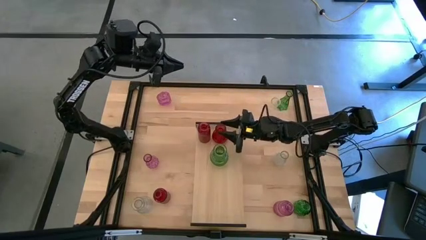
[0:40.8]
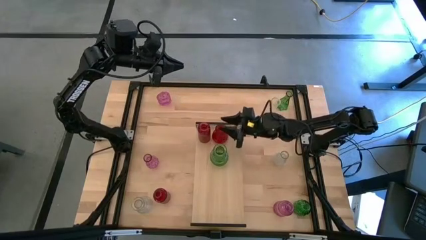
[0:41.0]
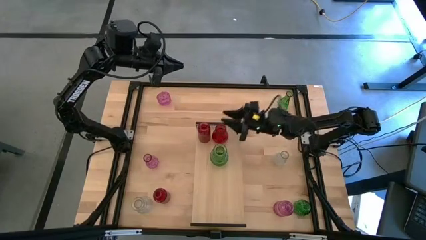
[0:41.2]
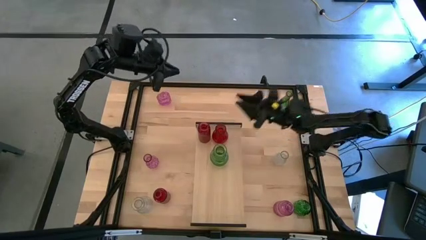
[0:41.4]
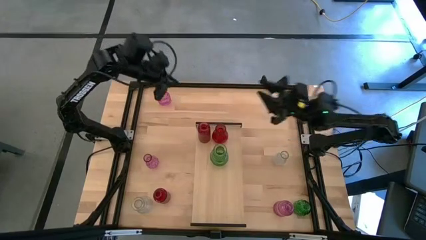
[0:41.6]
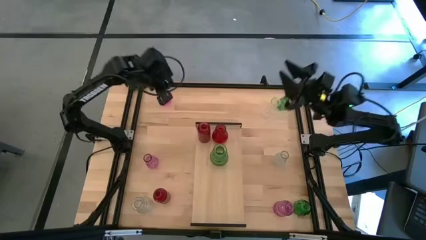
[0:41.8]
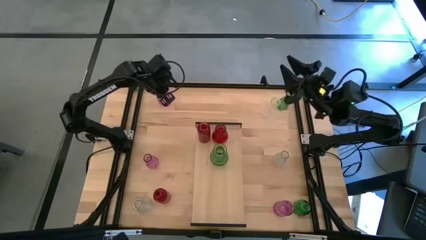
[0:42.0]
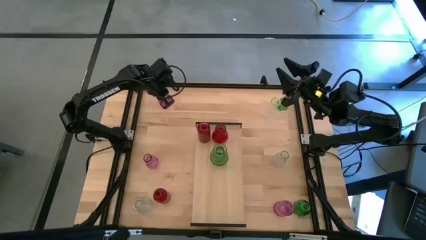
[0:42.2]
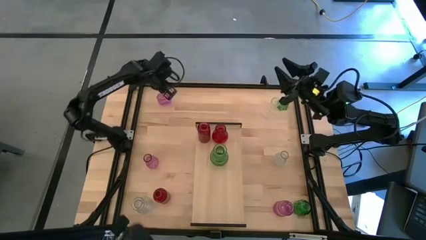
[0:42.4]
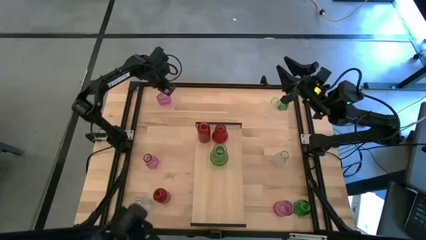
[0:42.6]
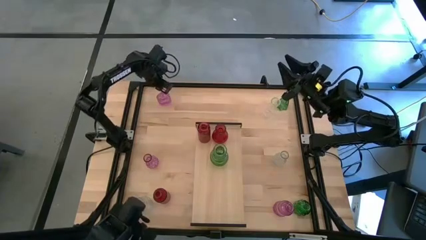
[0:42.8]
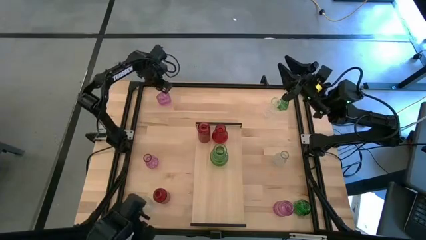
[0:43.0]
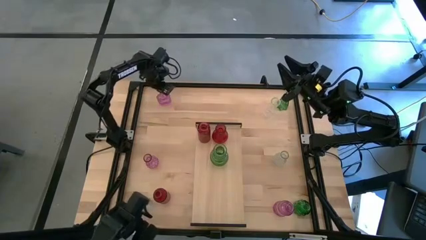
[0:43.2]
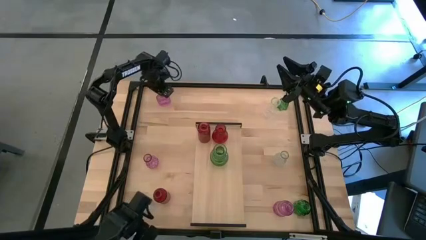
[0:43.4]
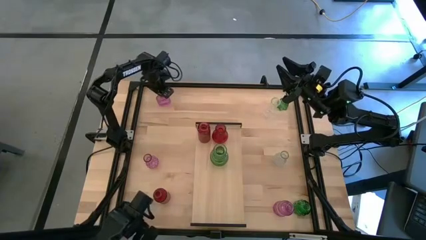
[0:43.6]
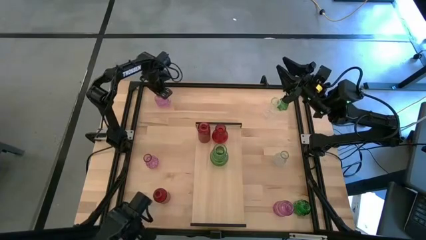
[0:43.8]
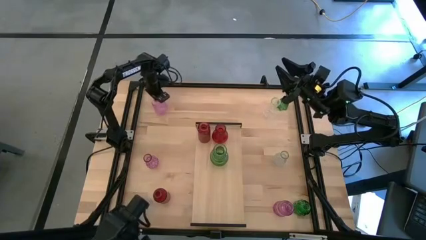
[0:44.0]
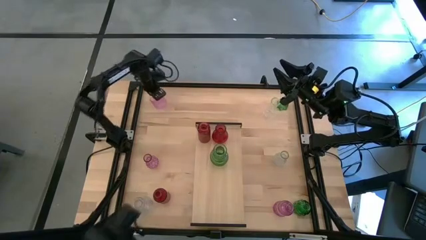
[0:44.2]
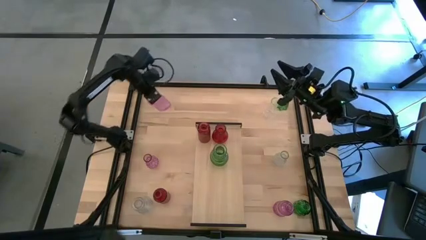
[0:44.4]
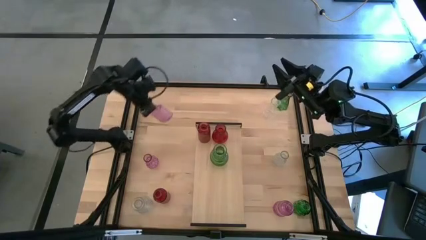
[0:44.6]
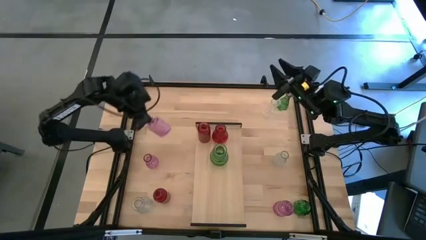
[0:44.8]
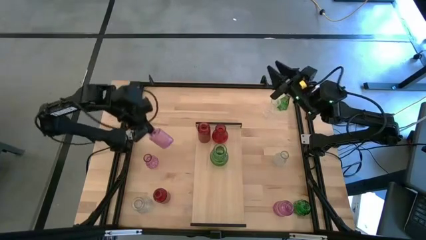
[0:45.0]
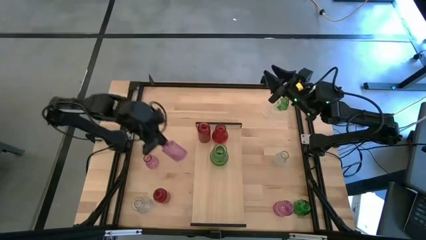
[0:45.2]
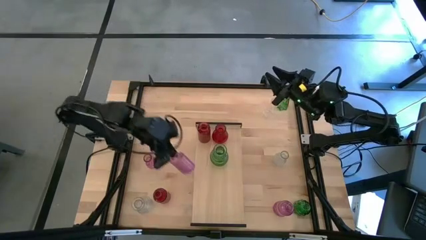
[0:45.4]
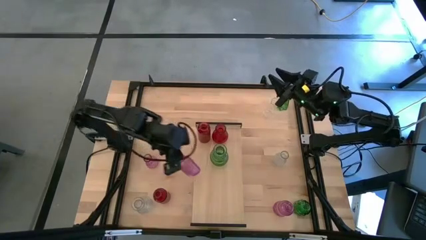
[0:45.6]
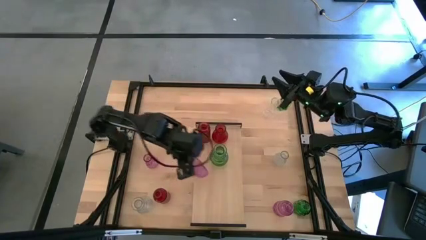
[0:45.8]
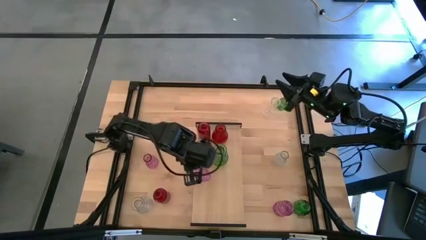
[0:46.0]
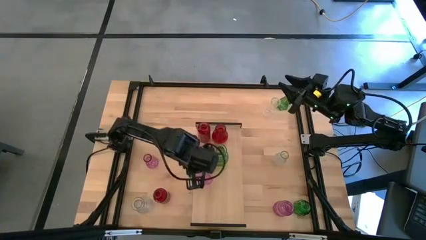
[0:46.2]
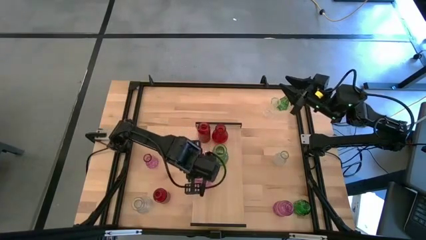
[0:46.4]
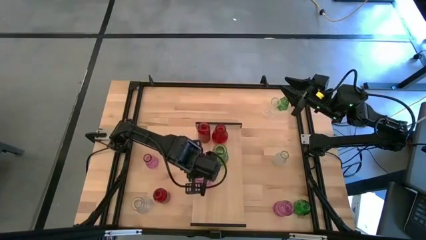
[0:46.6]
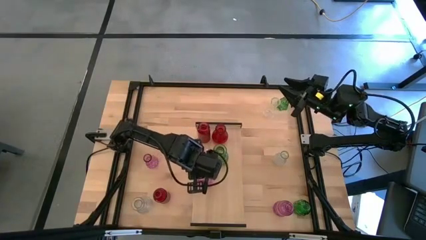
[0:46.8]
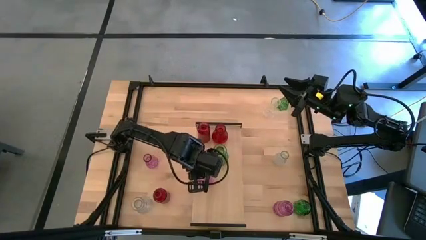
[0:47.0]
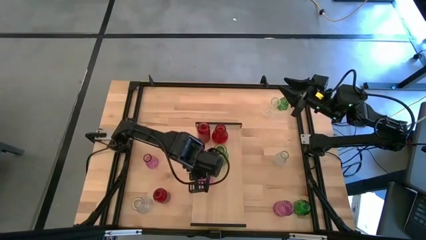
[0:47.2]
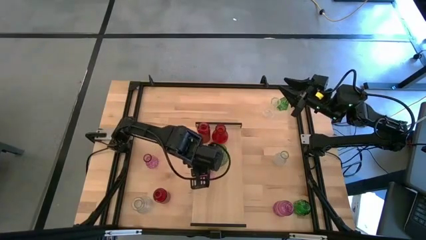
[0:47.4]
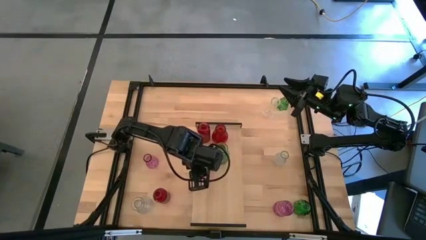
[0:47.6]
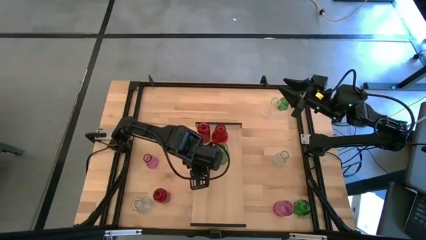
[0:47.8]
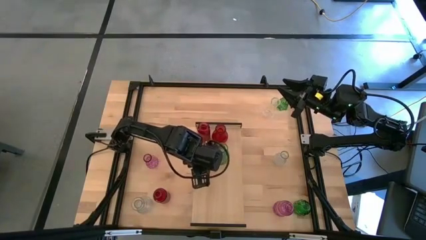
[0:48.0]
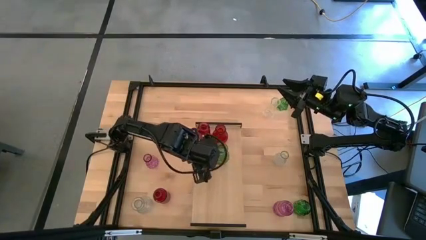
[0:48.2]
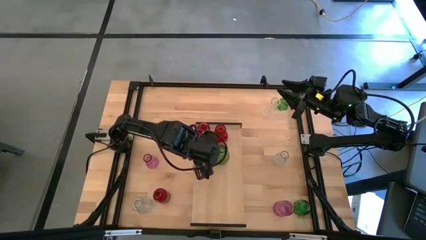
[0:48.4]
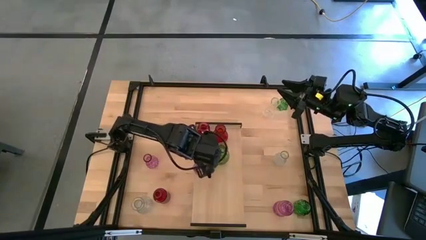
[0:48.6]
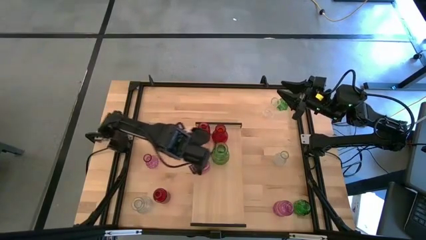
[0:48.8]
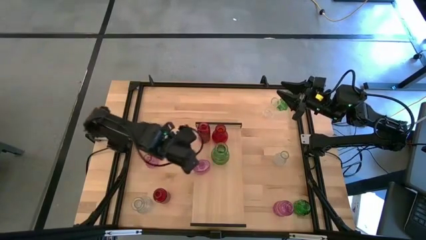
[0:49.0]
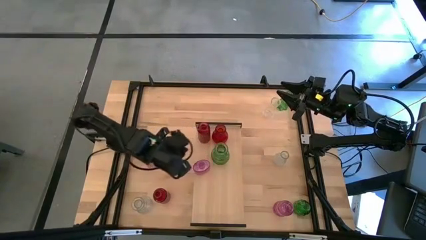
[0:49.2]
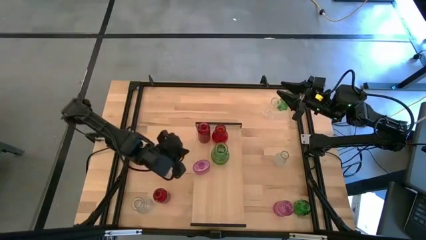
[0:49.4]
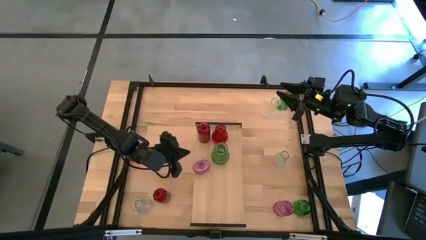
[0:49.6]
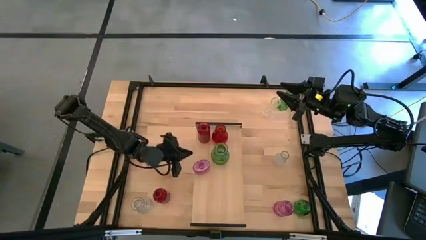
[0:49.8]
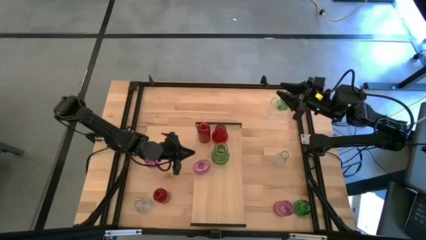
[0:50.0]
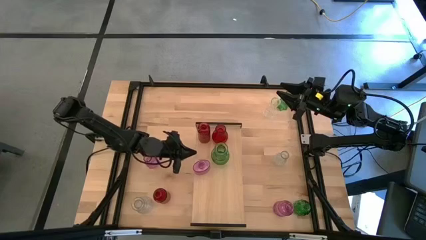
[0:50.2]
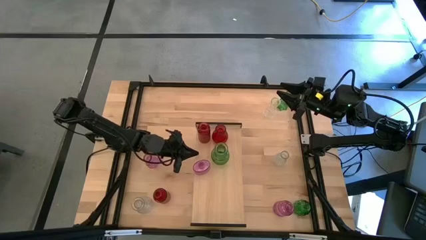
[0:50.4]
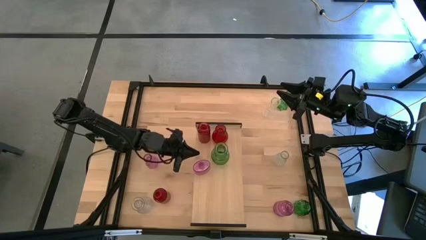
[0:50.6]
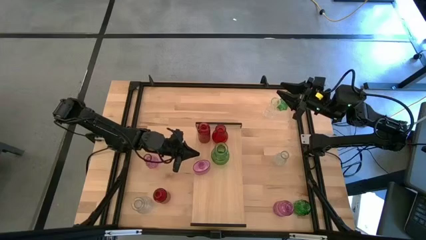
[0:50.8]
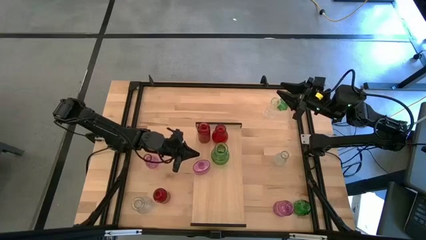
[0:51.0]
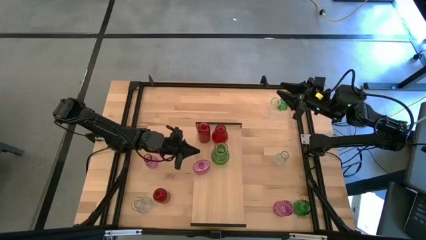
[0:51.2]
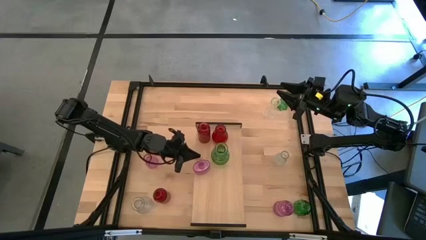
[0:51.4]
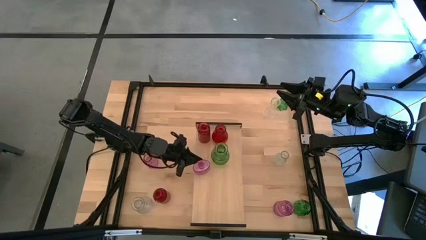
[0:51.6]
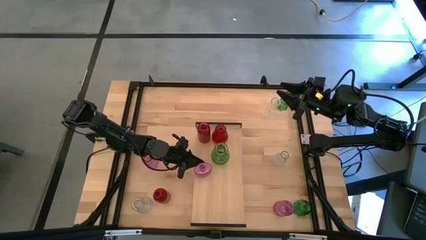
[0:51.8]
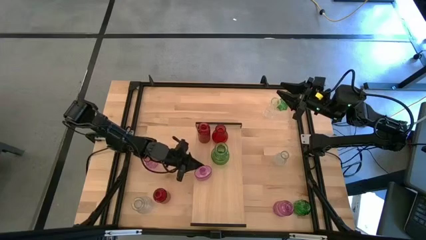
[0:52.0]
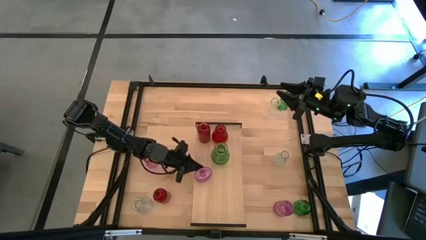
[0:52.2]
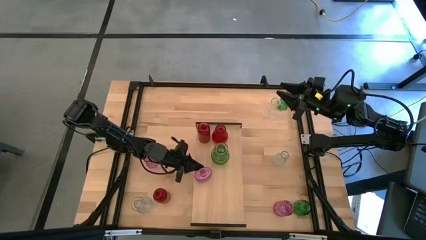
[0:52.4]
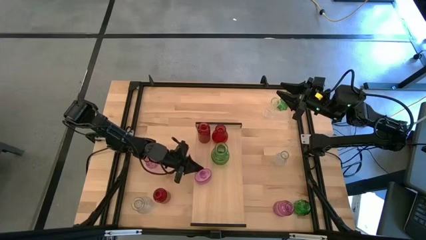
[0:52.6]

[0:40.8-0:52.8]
Task: sort vases onto shelf
Put the top left pink vase on the shelf

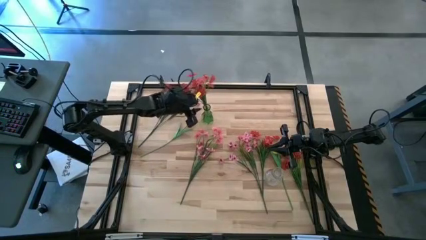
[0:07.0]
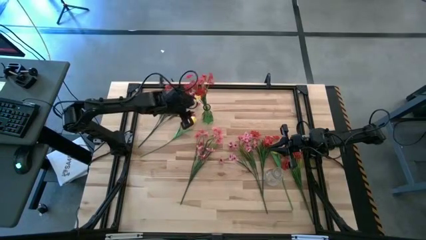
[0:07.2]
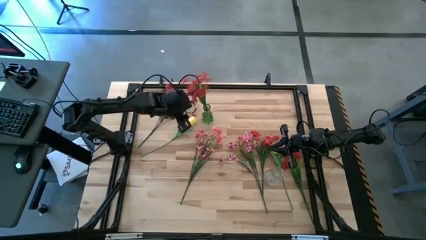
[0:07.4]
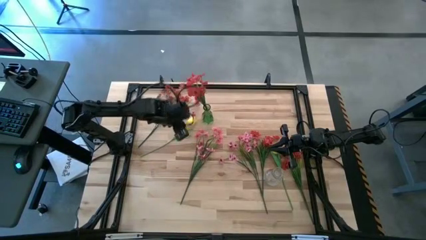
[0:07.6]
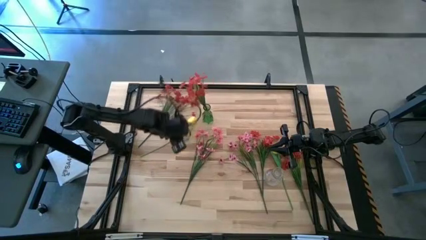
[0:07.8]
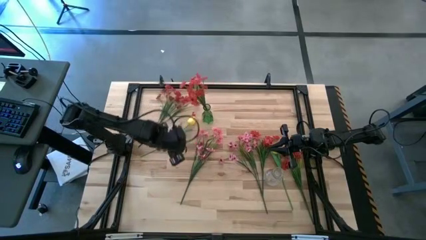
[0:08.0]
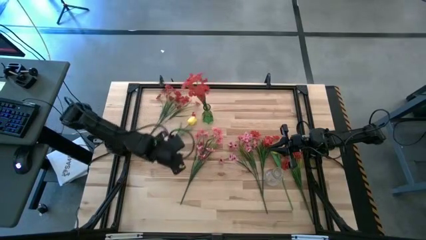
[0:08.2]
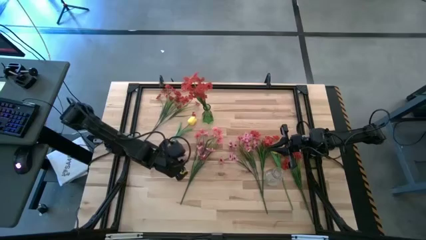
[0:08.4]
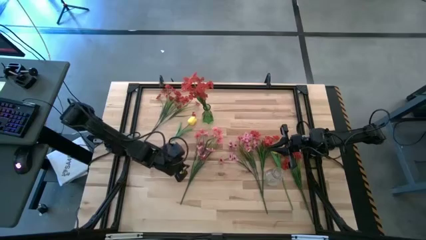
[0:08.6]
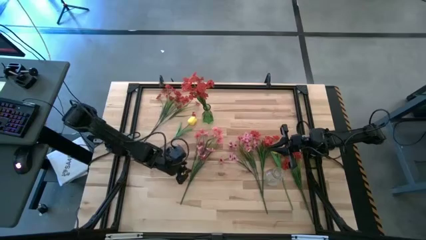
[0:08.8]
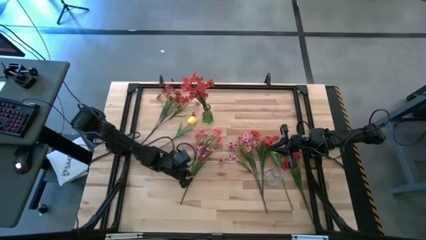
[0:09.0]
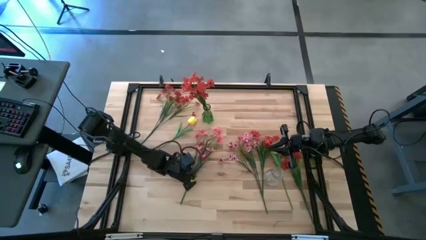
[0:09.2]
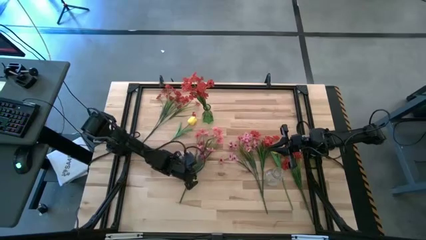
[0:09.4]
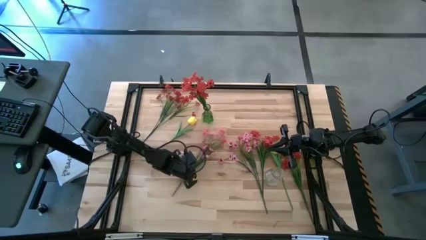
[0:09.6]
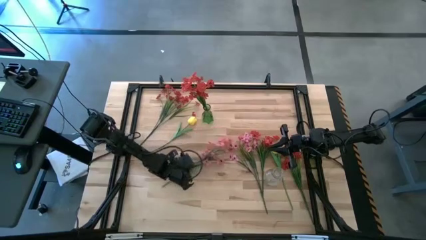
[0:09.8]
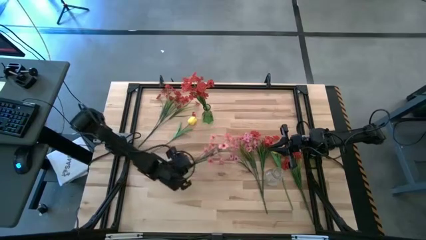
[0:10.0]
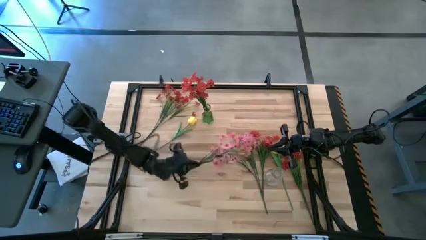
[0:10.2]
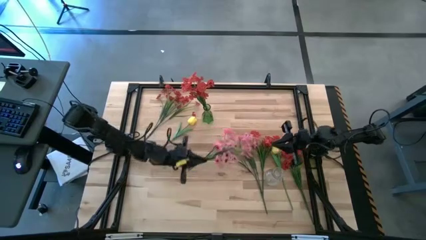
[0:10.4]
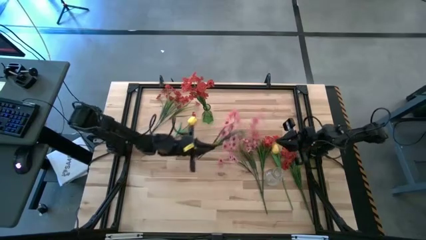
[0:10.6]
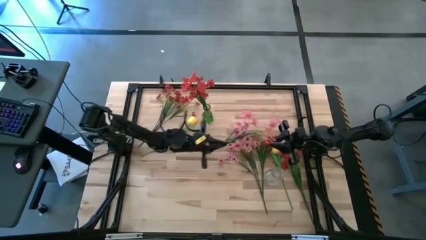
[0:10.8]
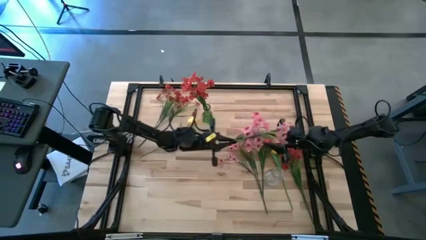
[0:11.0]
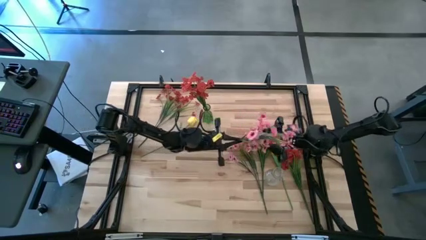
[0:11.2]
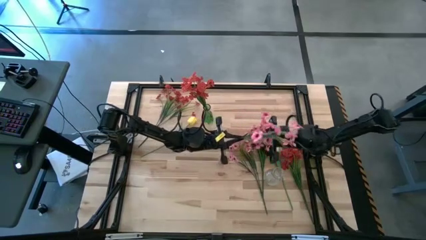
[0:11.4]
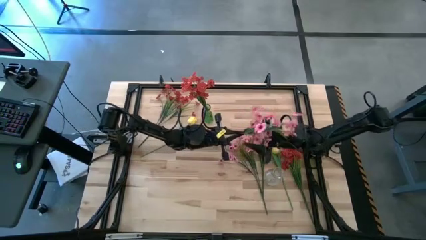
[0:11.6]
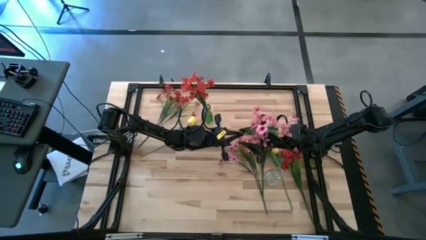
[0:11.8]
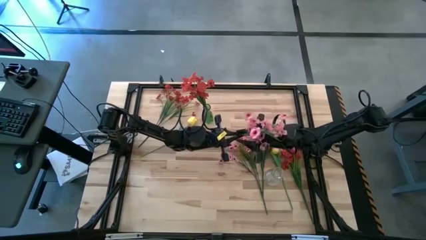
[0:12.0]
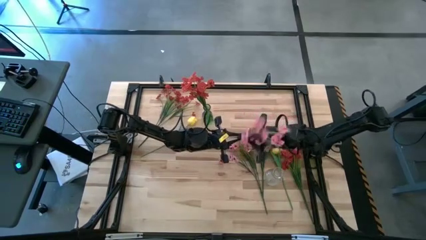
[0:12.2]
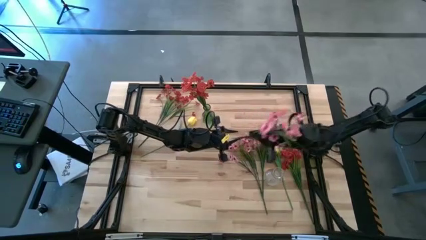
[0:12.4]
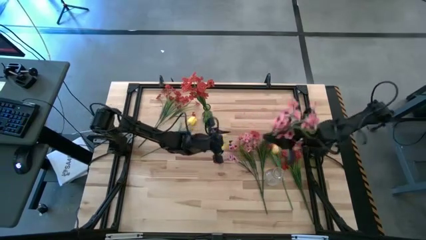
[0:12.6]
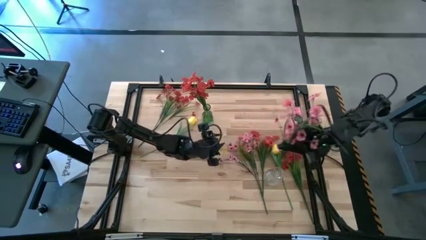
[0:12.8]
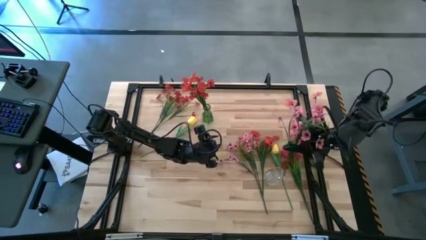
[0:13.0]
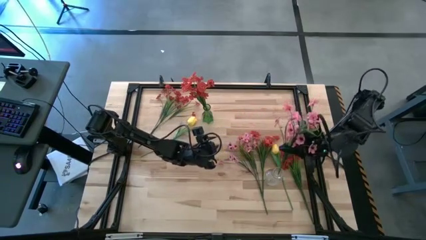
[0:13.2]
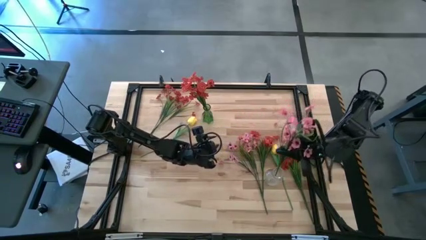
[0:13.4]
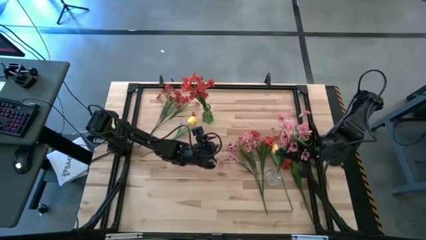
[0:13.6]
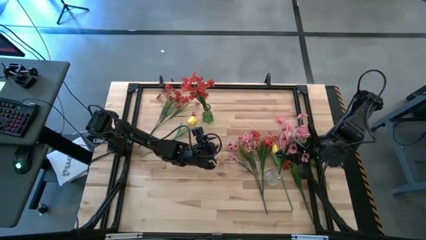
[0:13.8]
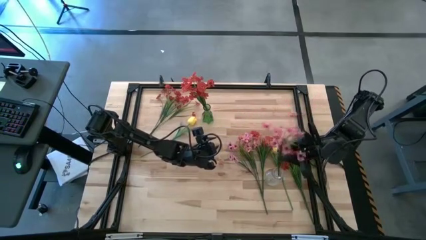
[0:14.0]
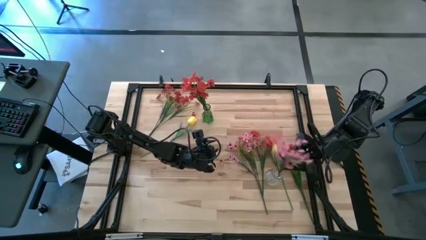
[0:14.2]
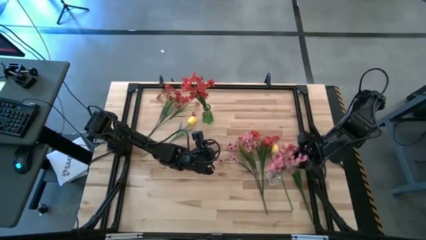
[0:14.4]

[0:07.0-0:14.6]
Task: Sort flowers into vase by color
Put the left pink flower into the transparent vase
